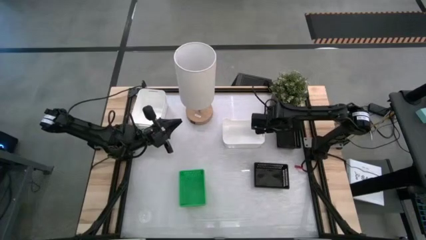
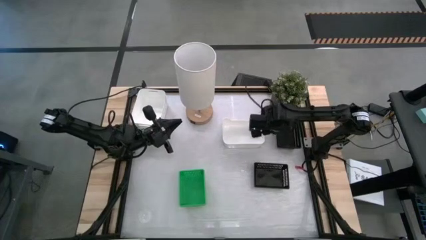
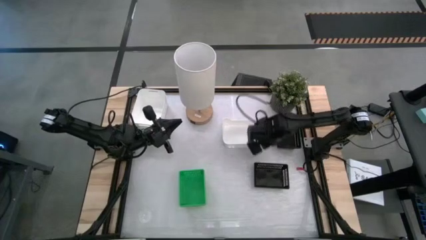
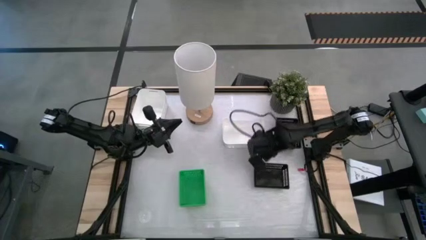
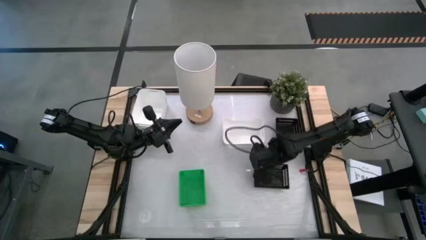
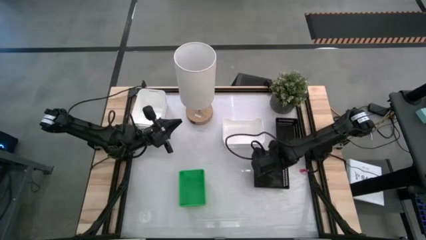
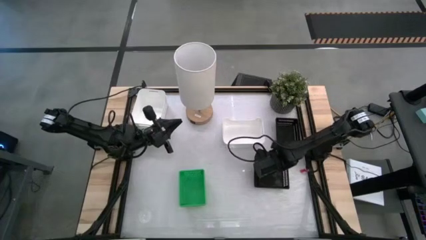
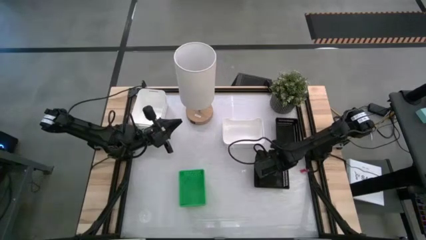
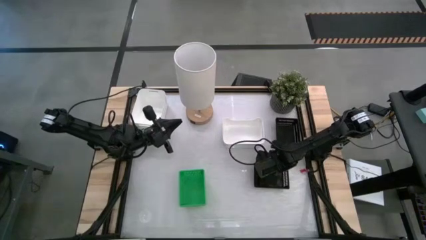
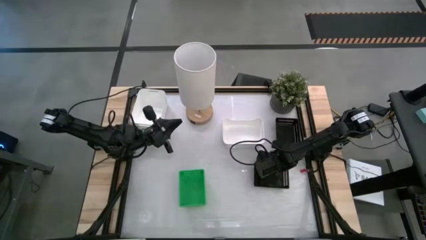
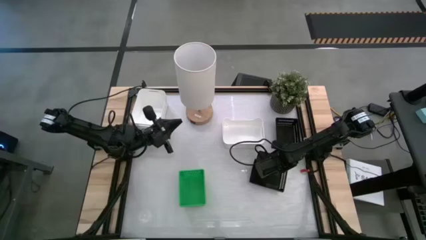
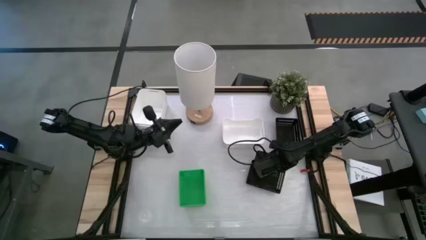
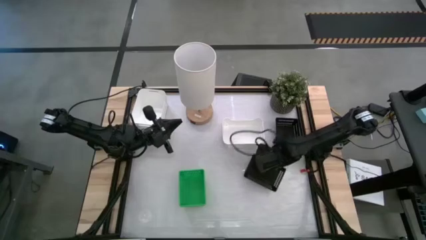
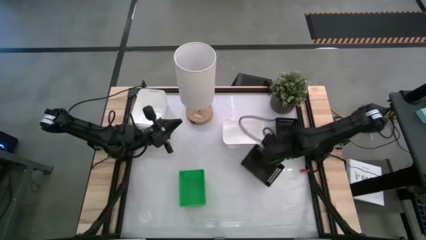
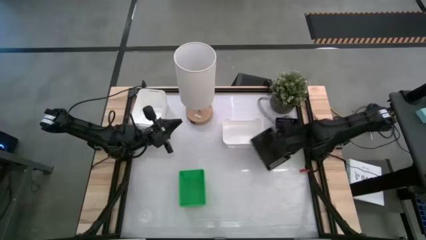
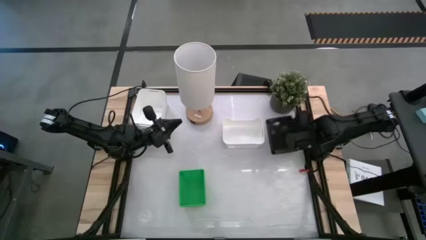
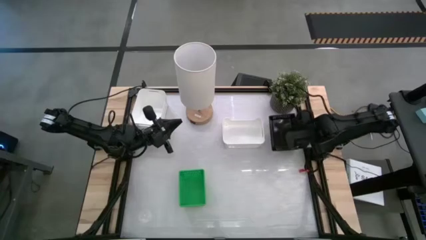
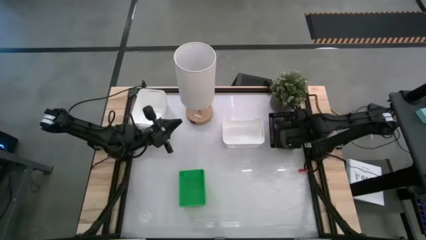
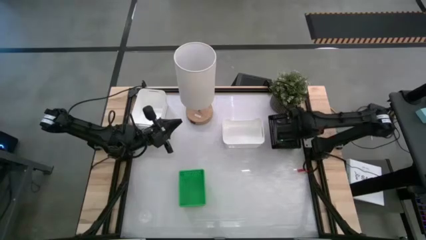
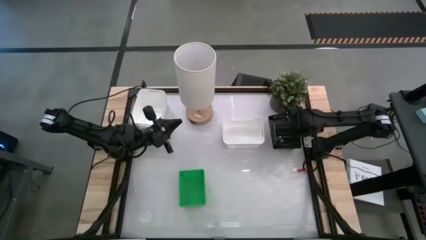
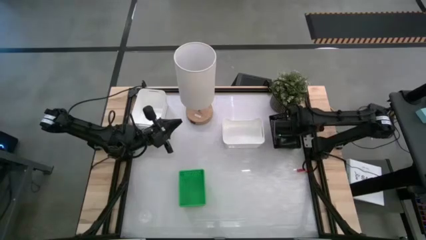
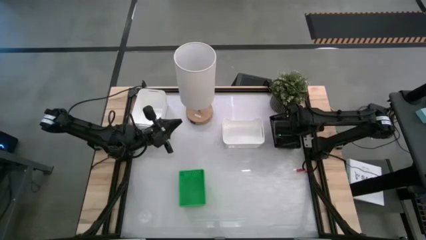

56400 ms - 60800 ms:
Stack the black bin on the black bins

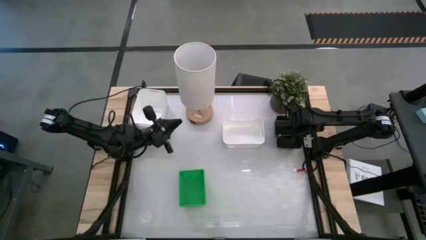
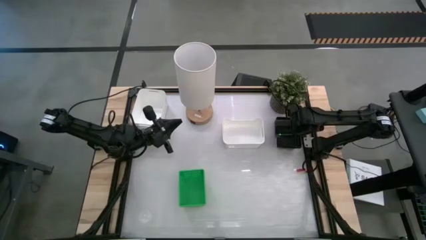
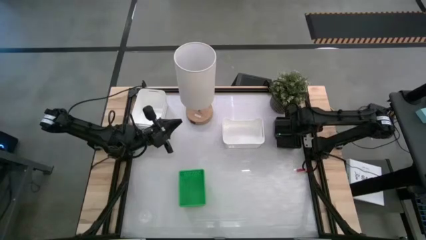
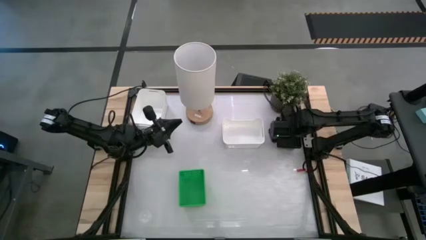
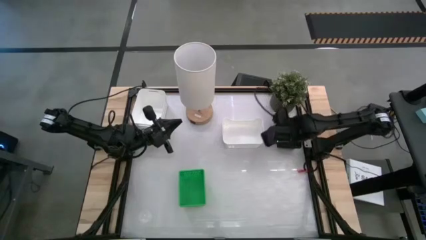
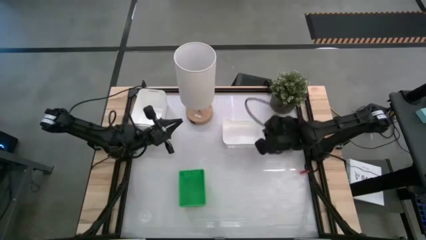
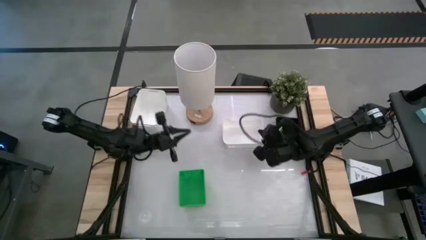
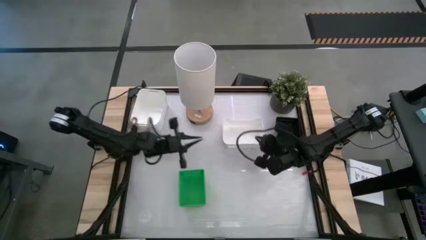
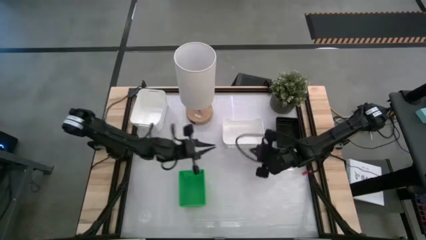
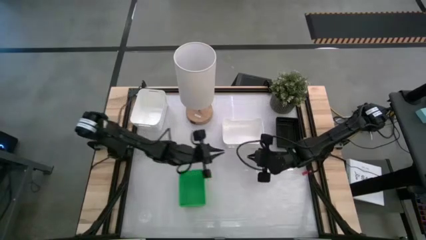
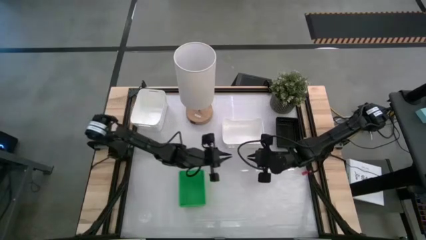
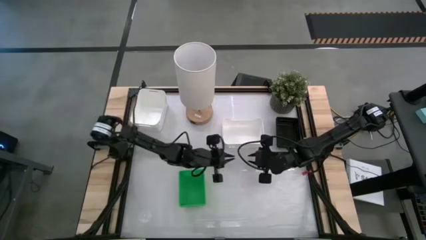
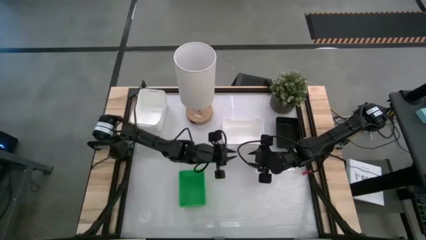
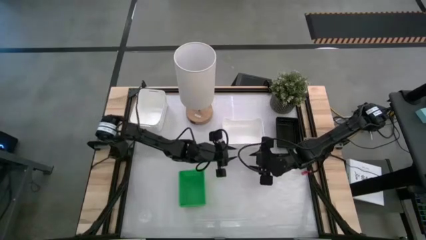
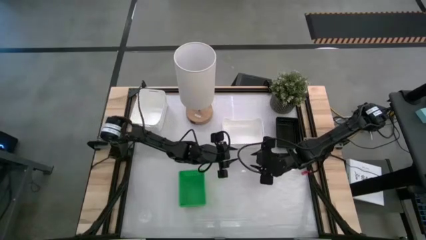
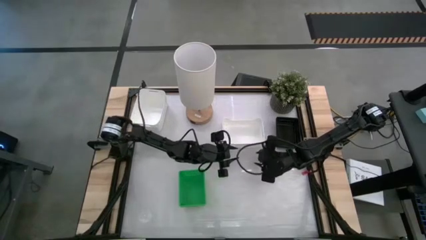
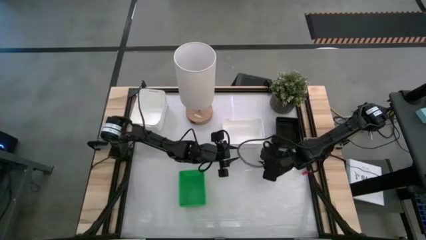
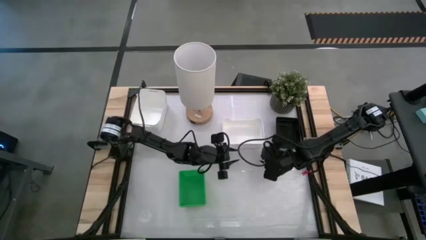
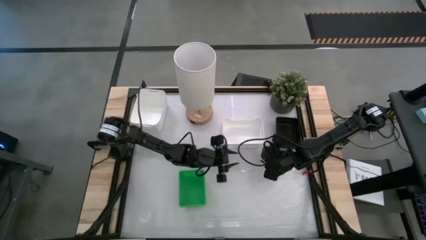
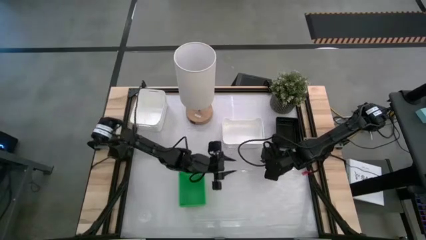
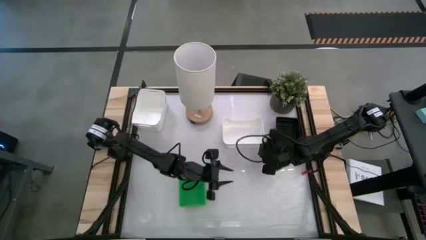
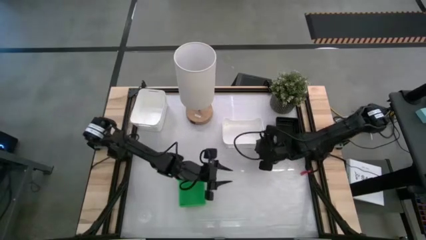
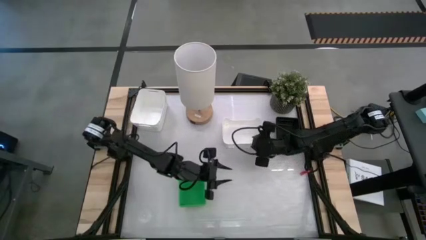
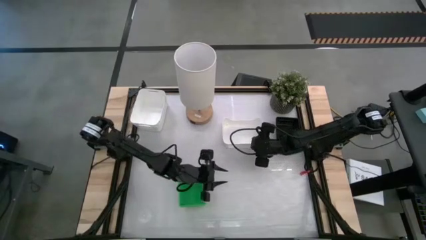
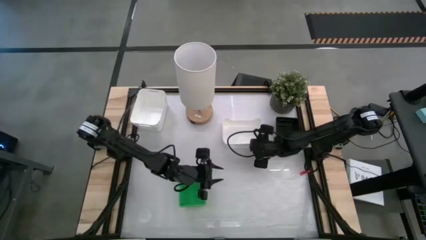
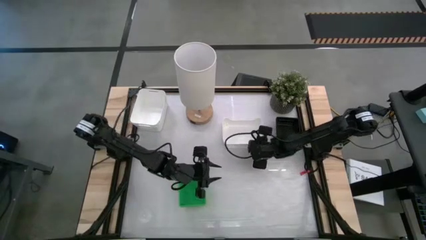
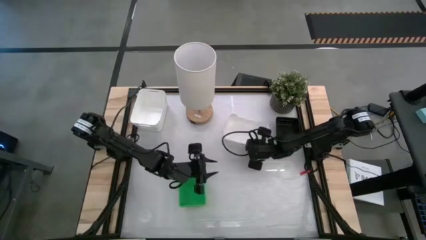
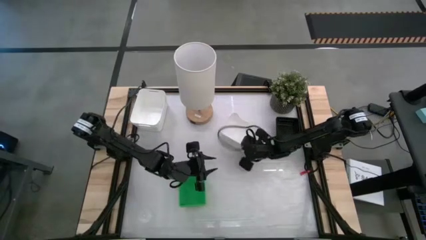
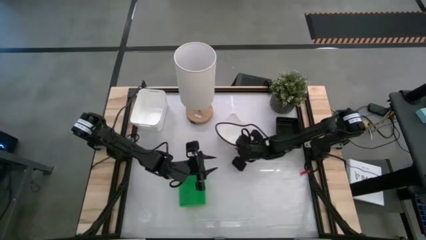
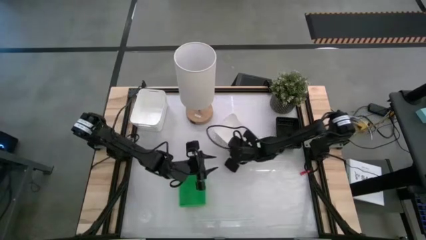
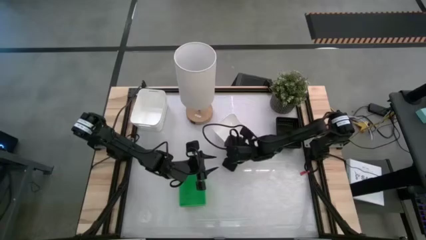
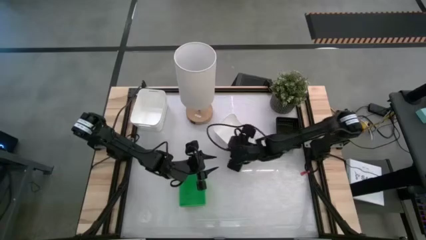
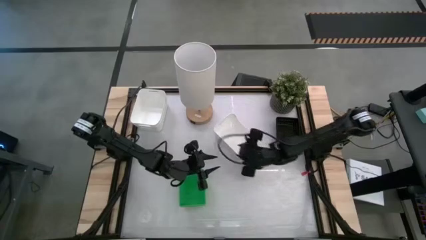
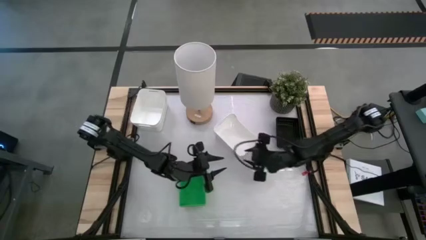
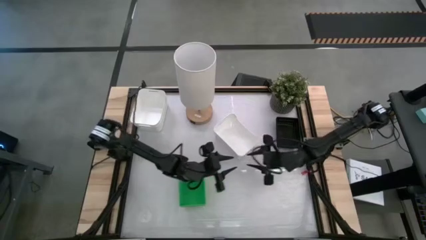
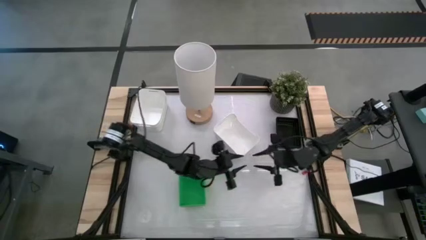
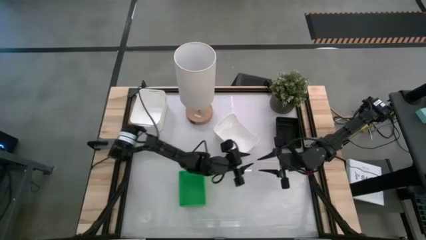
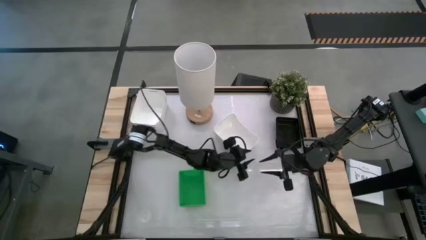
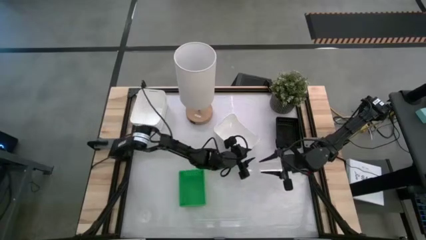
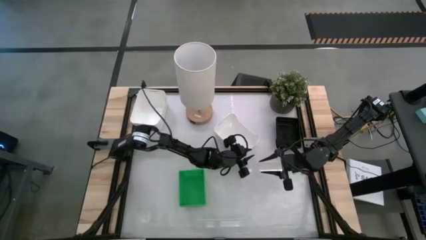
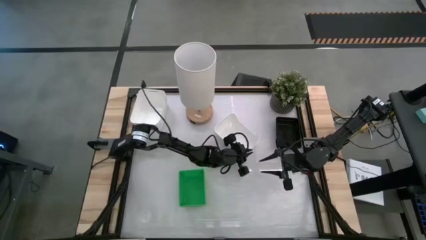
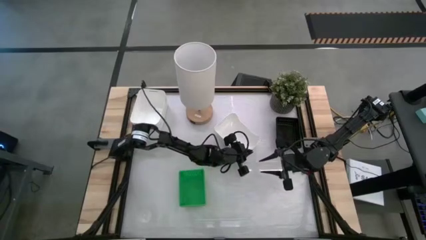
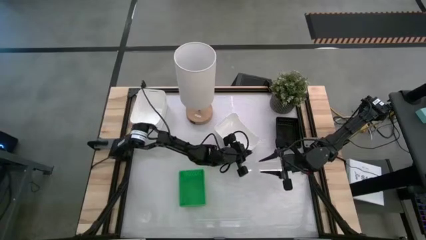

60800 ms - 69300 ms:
Stack the white bin on the white bins

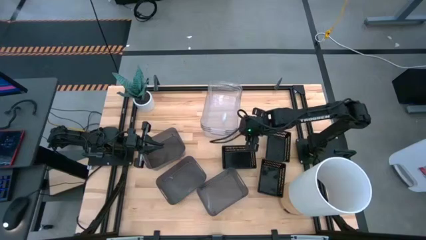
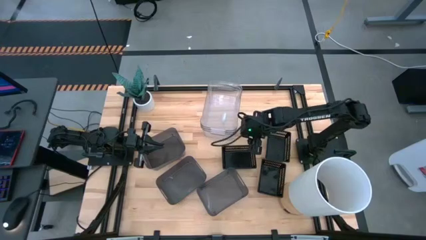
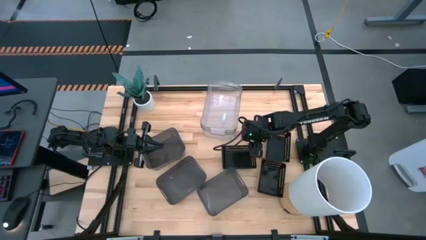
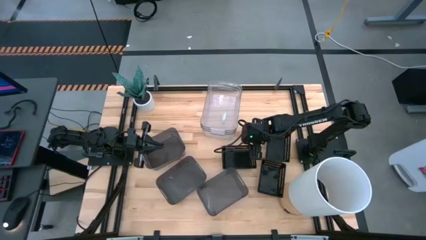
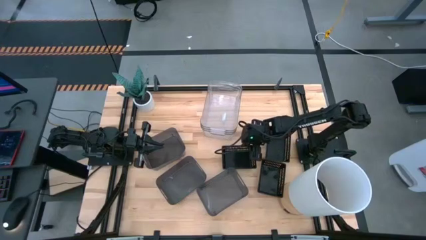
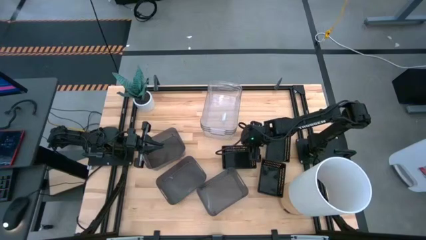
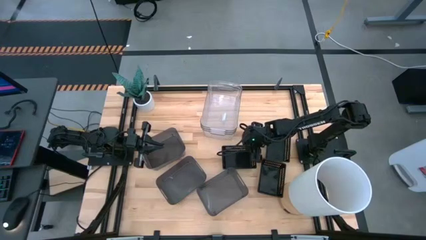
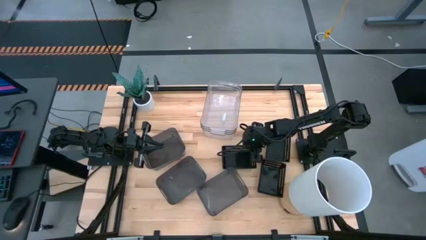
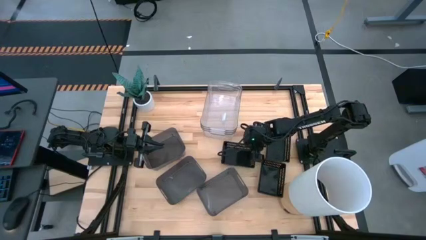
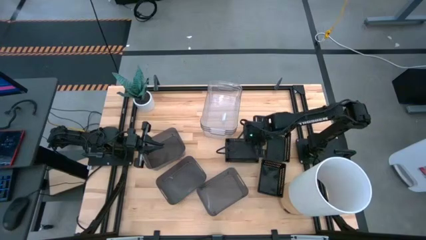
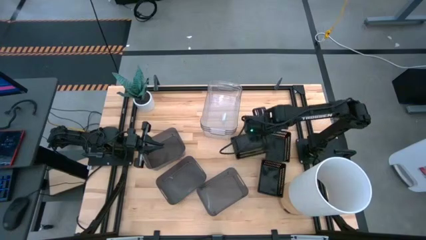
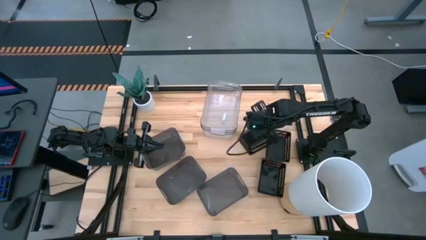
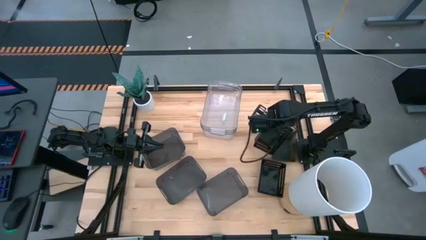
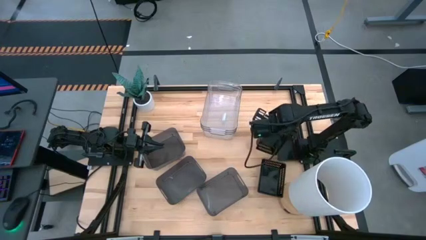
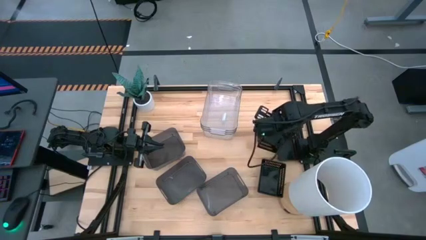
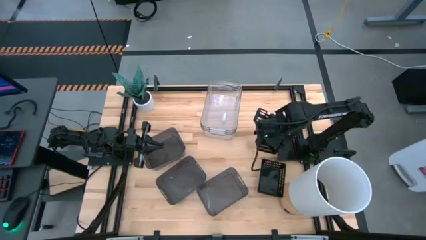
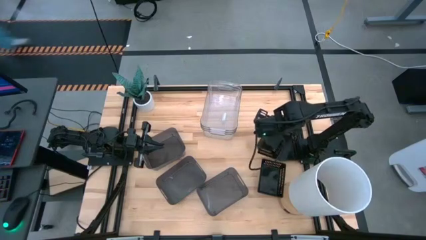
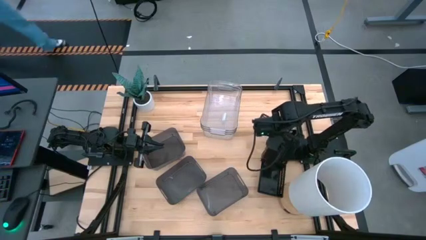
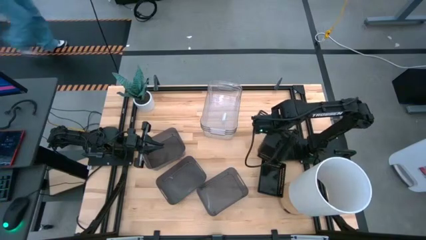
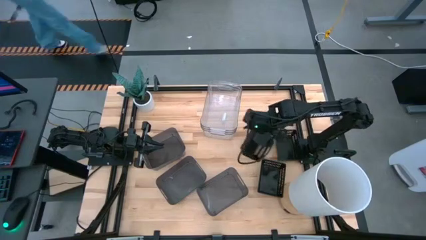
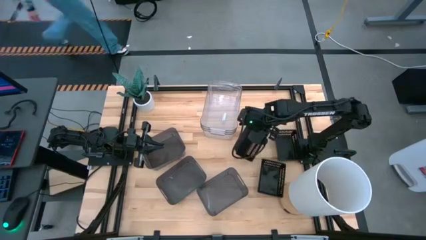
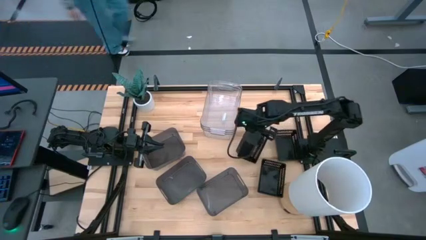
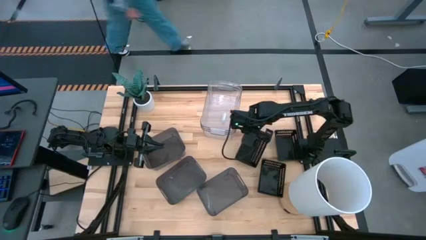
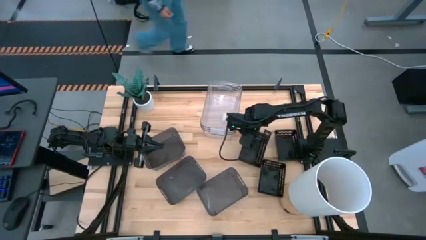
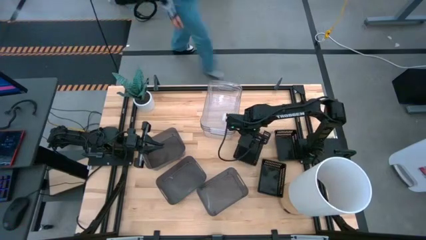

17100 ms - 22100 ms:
Stack the top right black bin on the top of the left black bin
